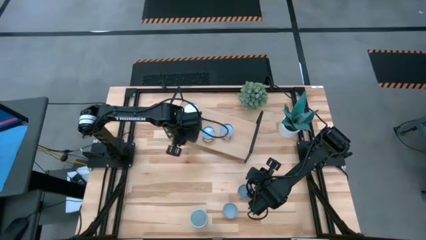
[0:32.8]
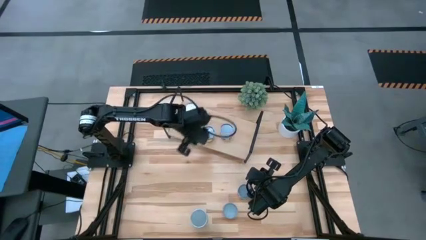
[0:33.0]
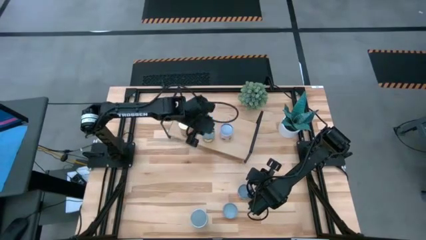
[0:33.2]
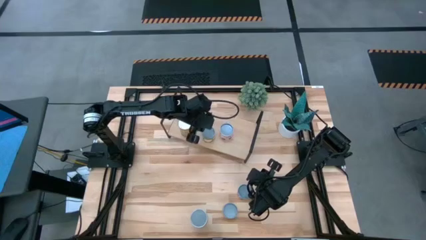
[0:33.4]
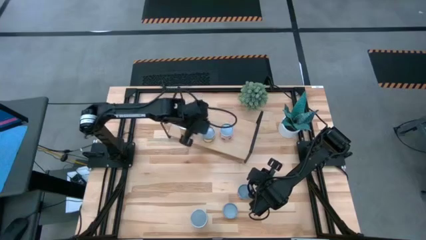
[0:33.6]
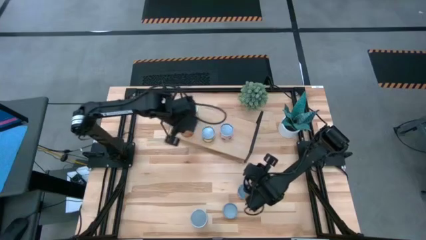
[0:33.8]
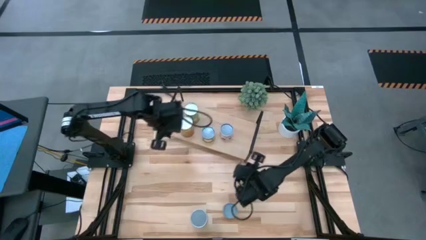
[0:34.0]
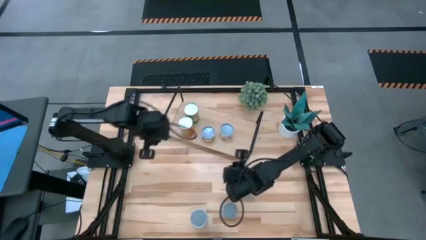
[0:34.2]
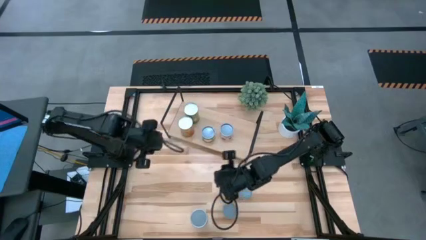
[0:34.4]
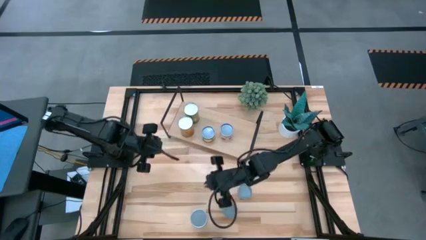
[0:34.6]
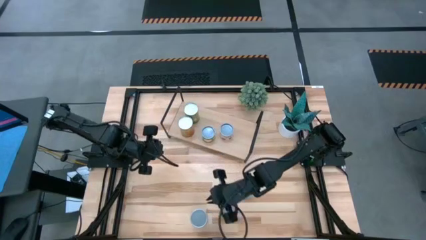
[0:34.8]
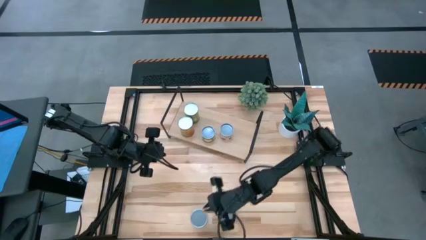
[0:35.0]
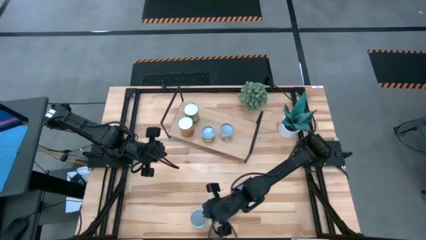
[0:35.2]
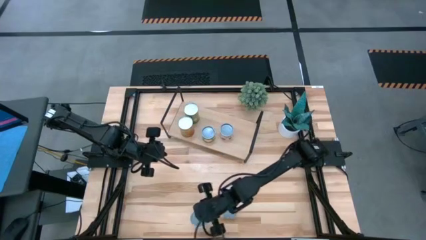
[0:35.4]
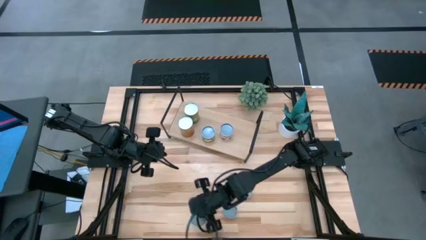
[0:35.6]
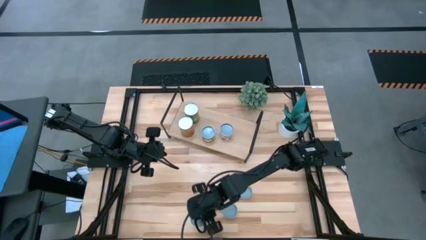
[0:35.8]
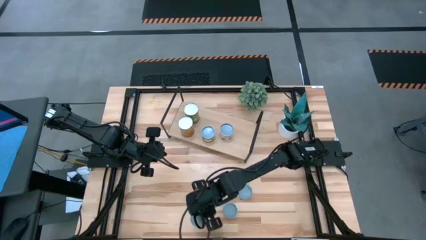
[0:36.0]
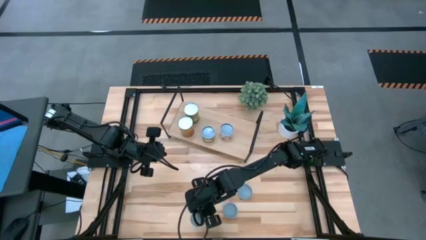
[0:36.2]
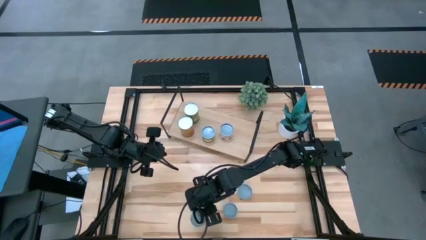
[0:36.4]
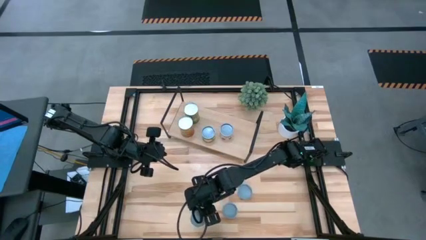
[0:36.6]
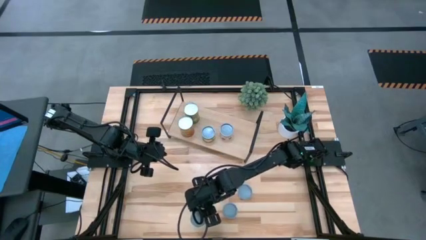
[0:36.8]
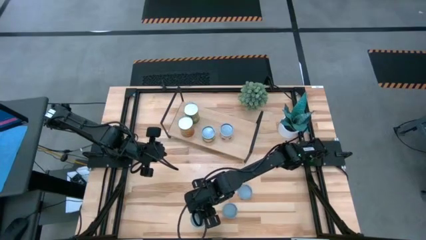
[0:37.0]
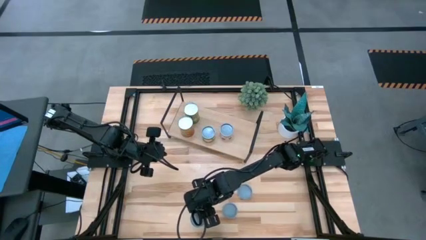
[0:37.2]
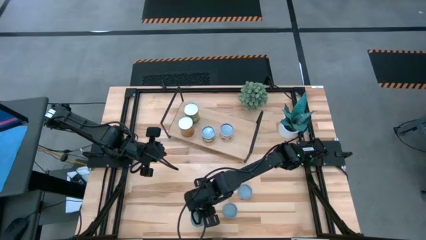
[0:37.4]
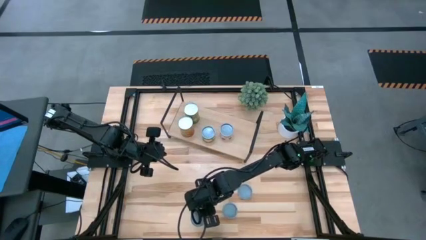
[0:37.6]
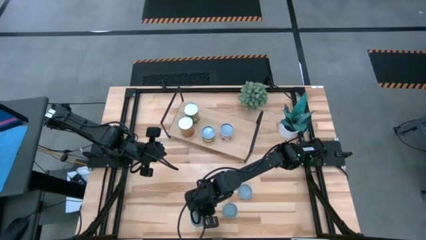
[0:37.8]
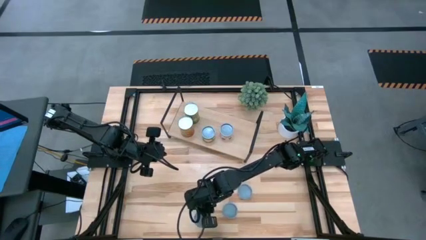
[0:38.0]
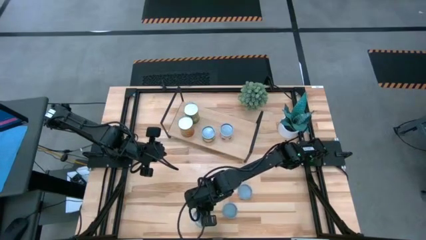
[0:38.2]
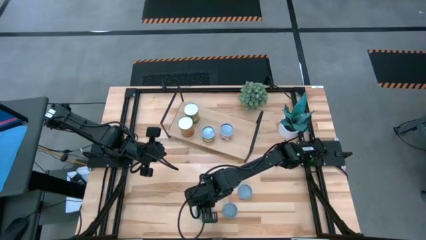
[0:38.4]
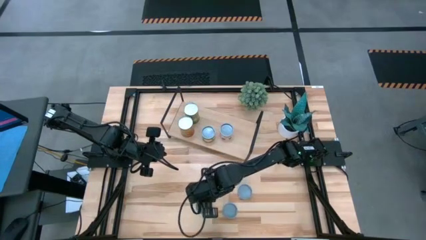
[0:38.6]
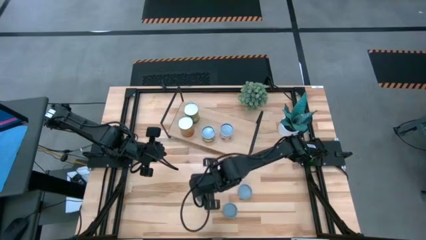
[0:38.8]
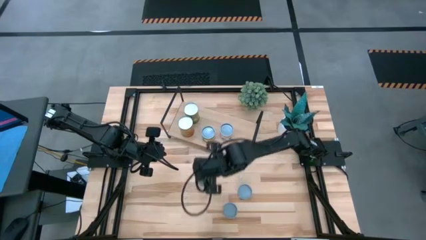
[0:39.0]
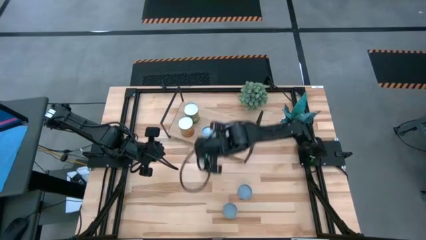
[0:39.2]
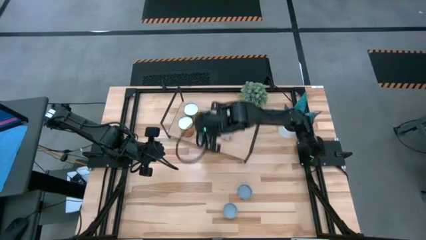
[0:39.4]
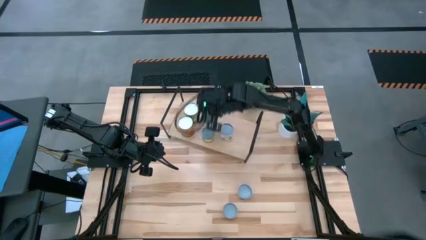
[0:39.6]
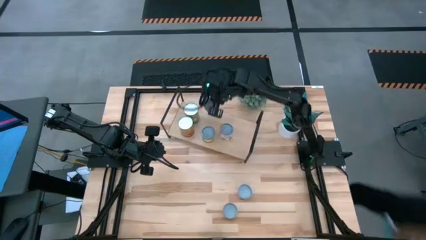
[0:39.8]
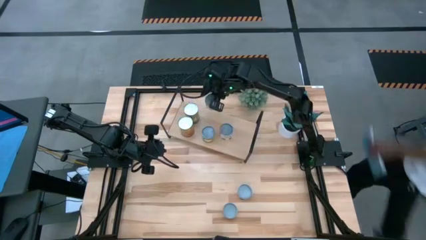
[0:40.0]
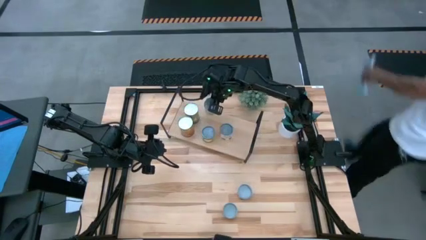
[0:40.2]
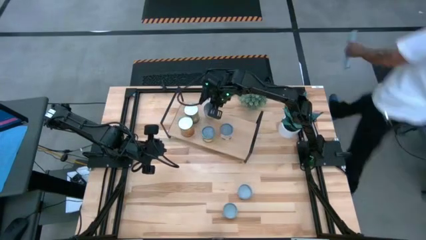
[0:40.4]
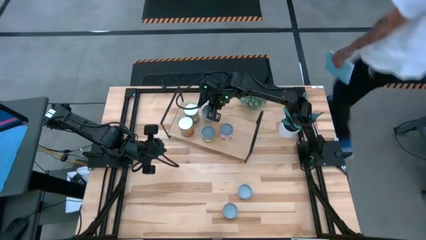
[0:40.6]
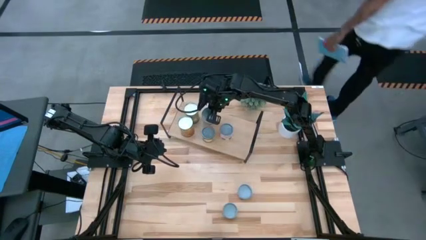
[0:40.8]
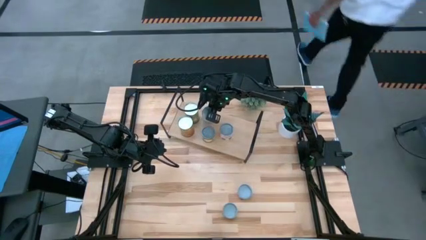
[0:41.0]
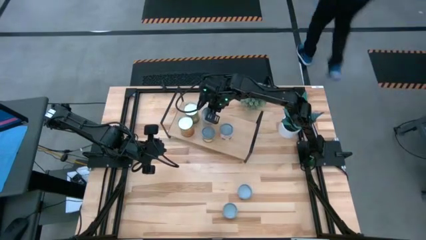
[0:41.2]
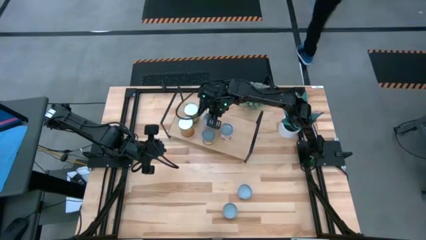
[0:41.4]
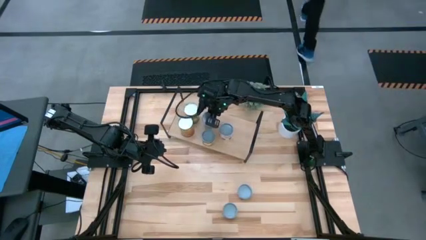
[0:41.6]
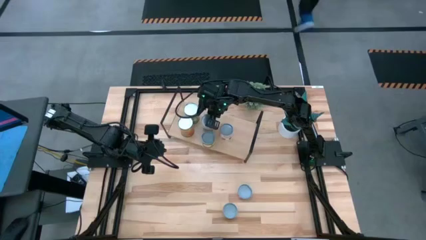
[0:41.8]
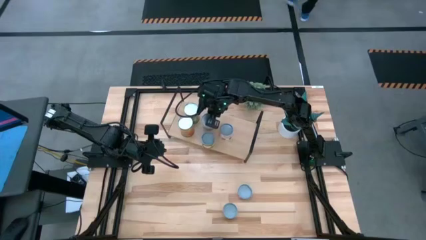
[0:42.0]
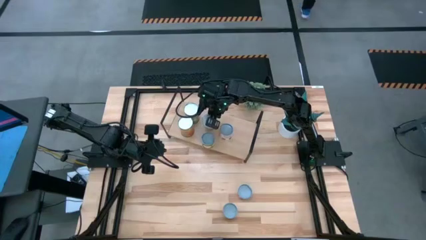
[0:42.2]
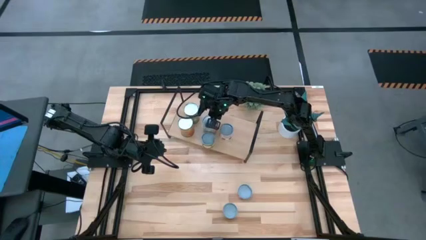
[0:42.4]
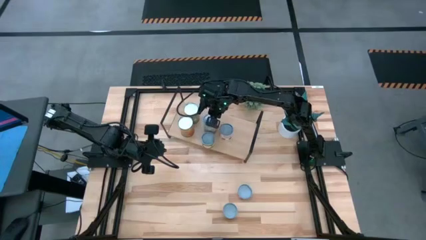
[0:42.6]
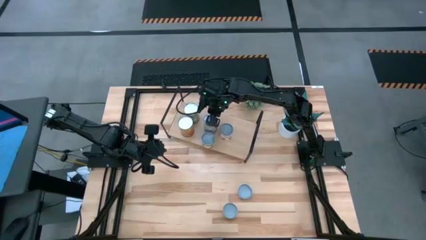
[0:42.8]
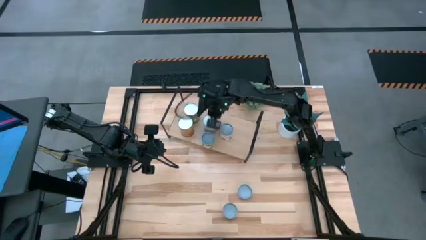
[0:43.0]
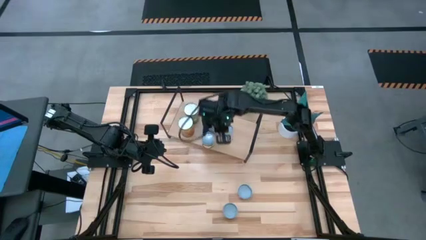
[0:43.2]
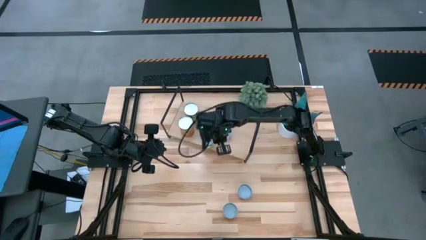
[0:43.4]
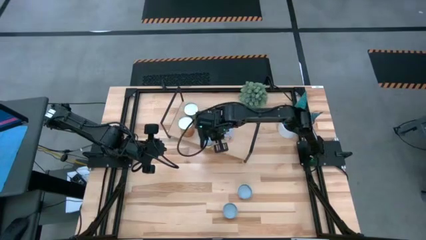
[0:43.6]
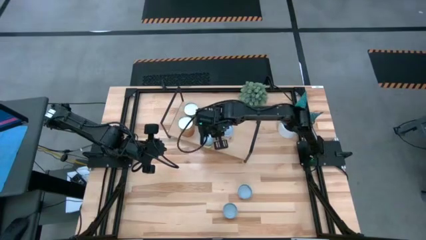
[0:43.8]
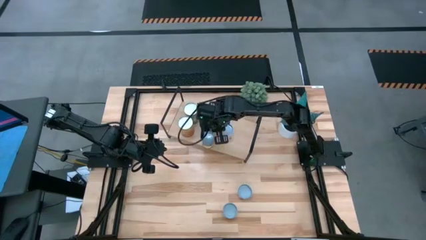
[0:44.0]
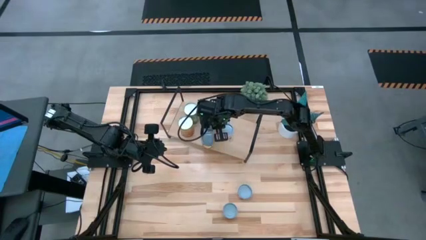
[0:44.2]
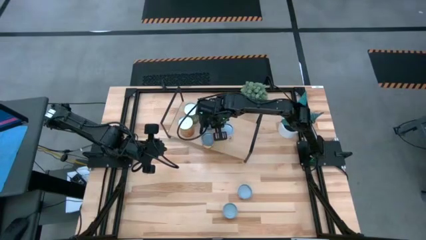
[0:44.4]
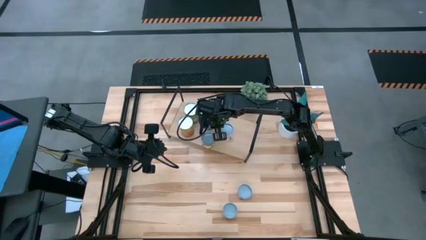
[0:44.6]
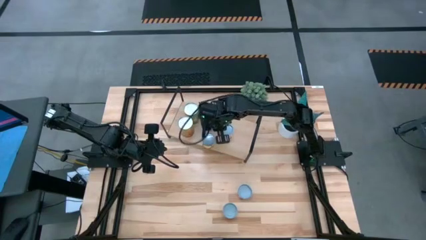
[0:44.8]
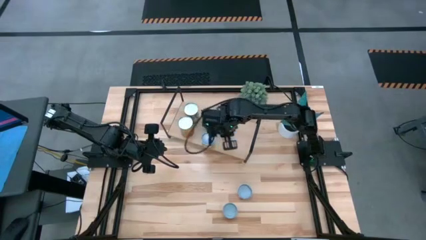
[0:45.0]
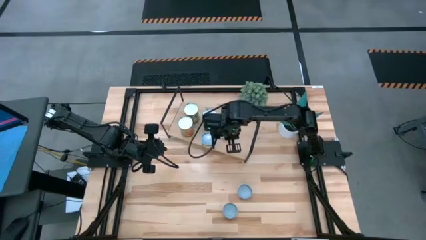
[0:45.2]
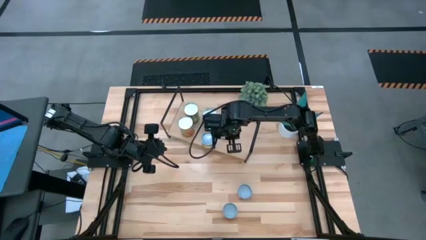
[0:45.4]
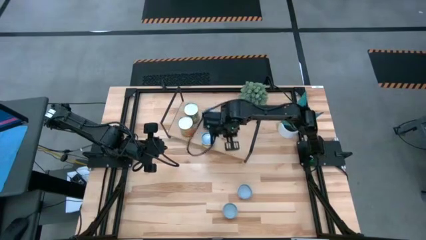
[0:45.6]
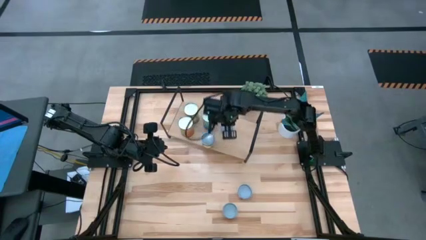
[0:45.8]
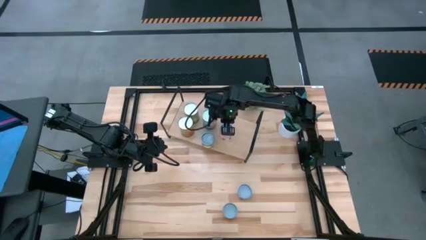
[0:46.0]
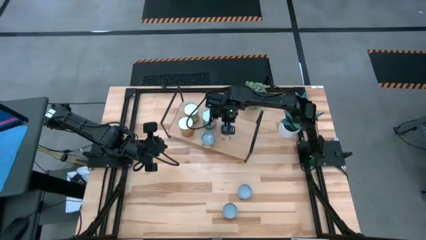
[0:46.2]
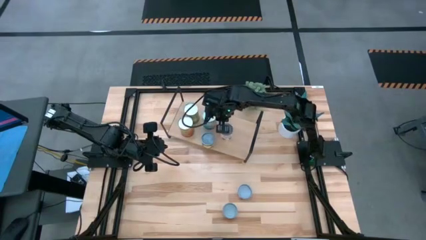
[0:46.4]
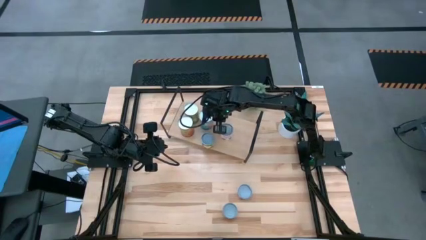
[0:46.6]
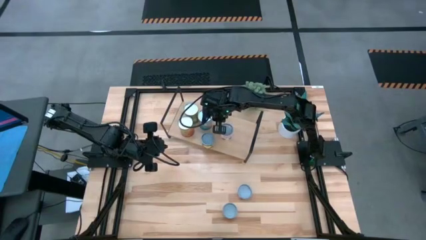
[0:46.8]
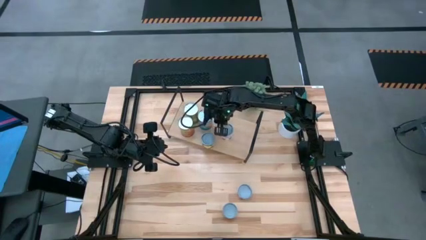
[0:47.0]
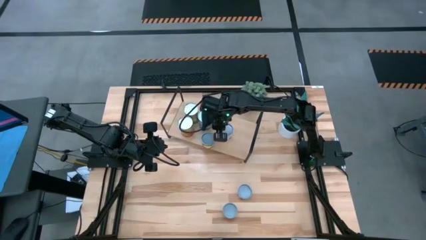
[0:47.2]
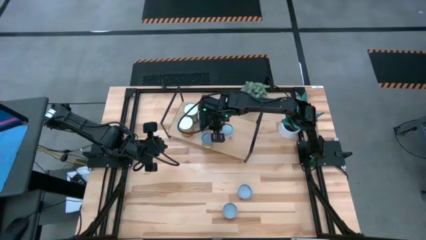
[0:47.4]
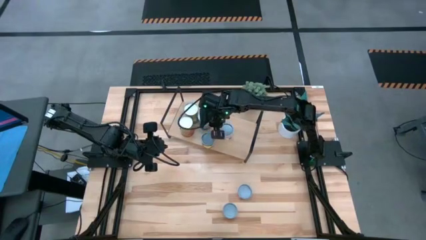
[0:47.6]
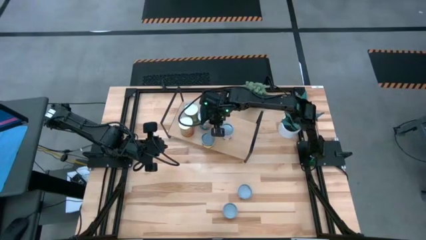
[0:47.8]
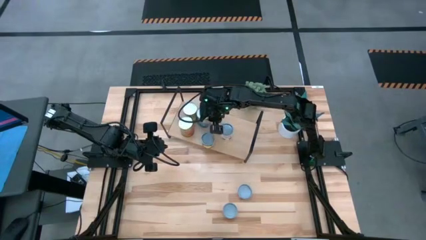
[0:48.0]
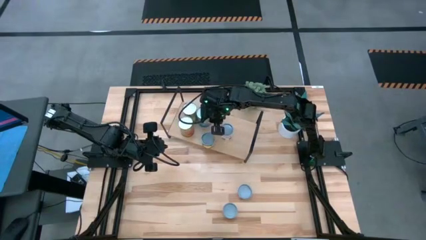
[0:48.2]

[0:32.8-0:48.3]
Task: Pick and place cans onto a shelf
Put the canned tomatoes on the shelf
